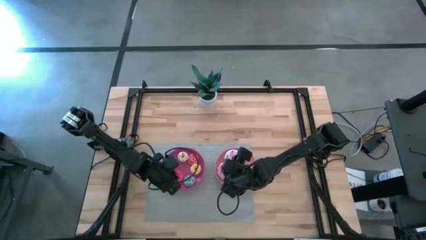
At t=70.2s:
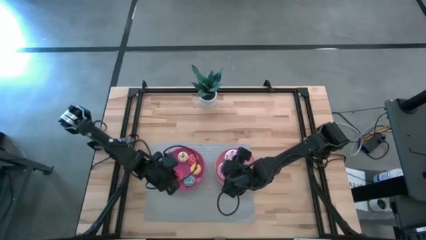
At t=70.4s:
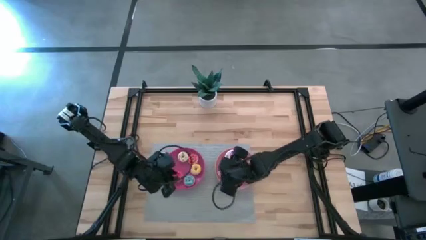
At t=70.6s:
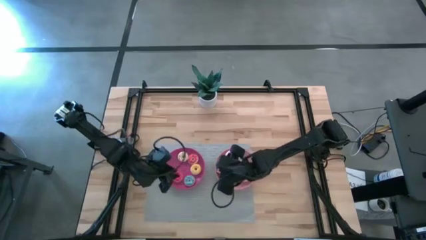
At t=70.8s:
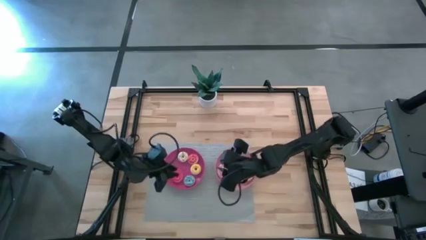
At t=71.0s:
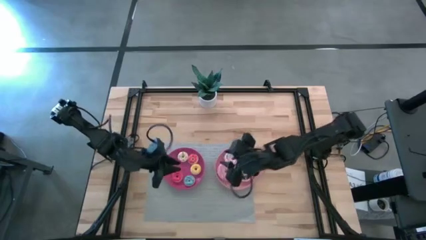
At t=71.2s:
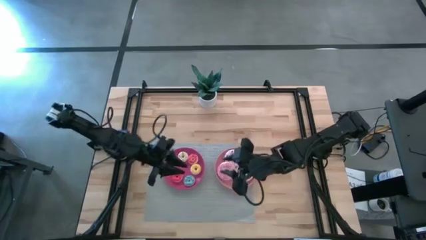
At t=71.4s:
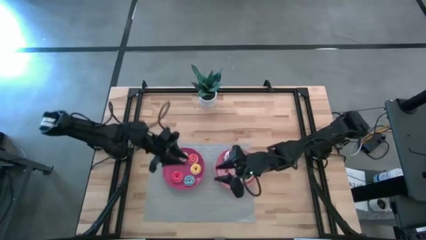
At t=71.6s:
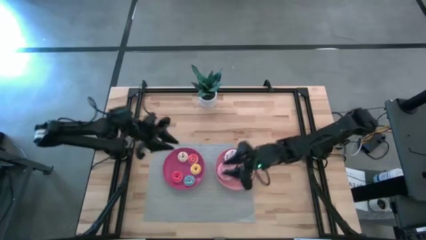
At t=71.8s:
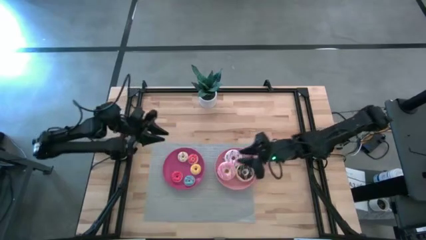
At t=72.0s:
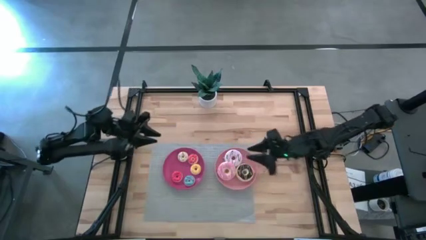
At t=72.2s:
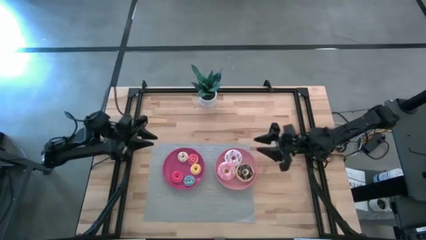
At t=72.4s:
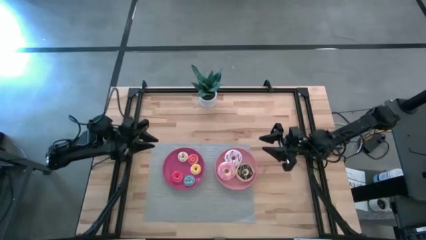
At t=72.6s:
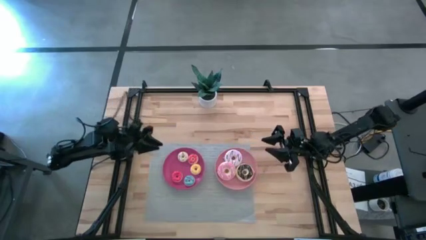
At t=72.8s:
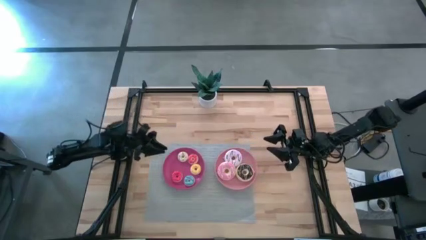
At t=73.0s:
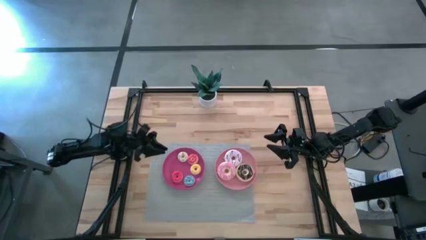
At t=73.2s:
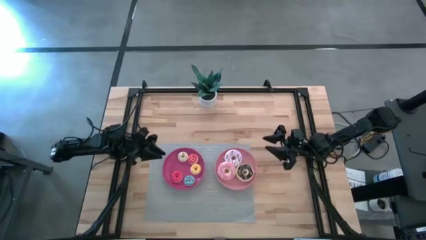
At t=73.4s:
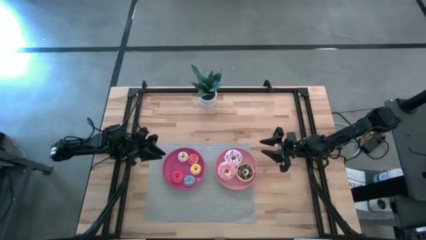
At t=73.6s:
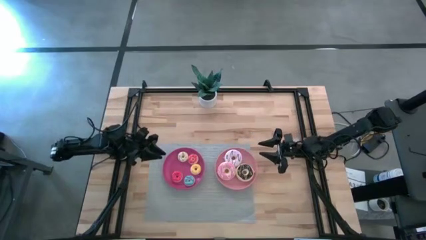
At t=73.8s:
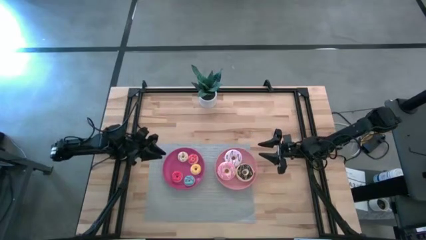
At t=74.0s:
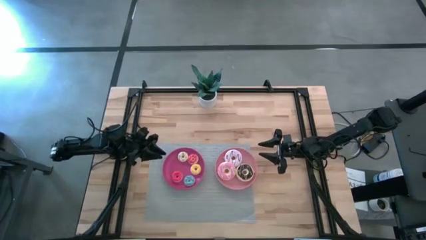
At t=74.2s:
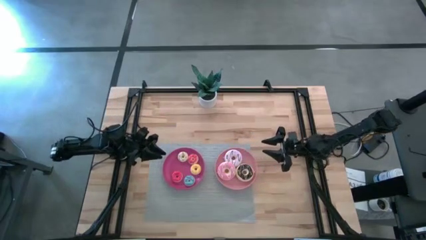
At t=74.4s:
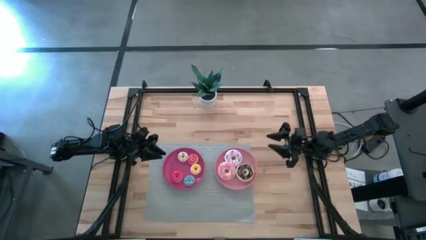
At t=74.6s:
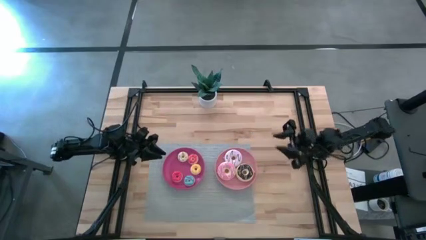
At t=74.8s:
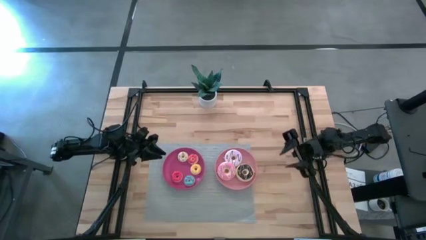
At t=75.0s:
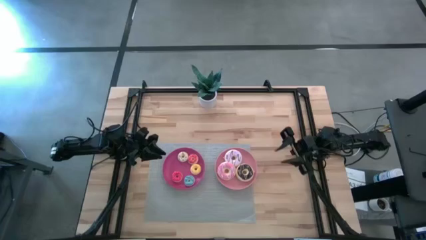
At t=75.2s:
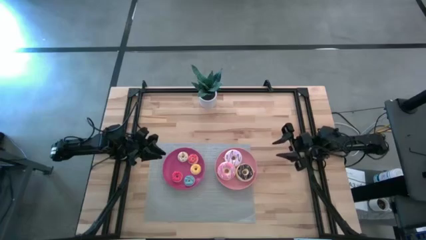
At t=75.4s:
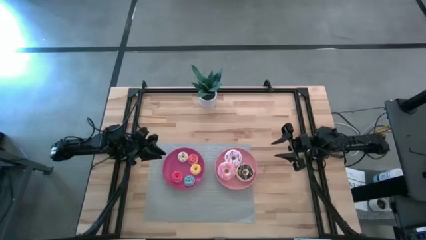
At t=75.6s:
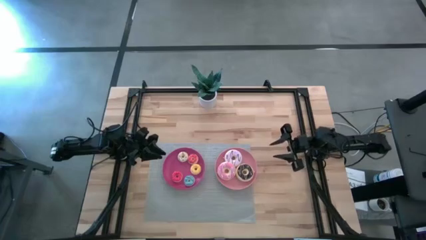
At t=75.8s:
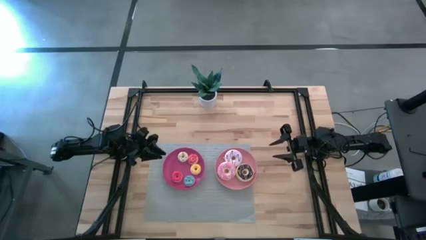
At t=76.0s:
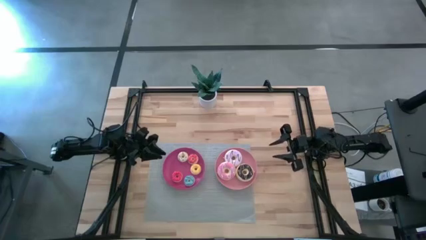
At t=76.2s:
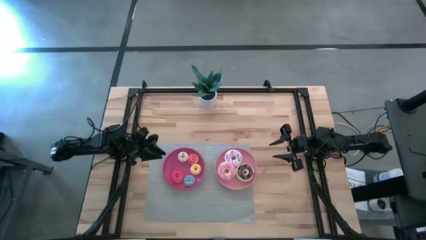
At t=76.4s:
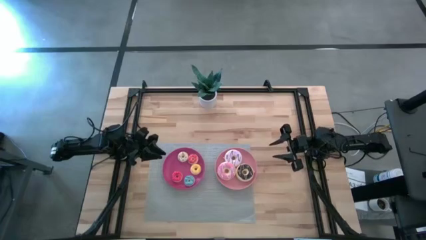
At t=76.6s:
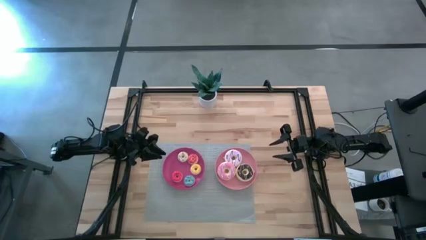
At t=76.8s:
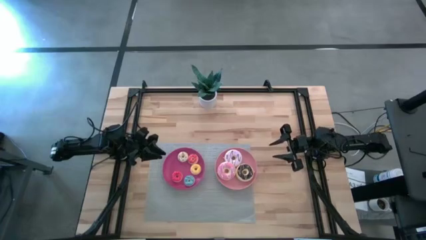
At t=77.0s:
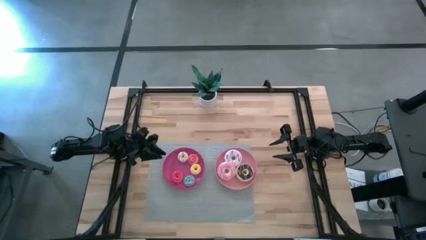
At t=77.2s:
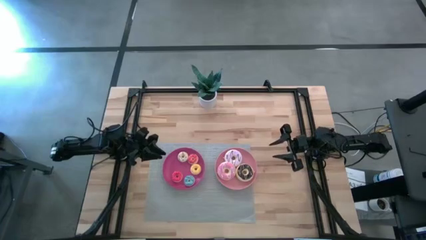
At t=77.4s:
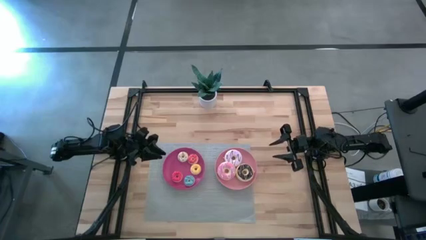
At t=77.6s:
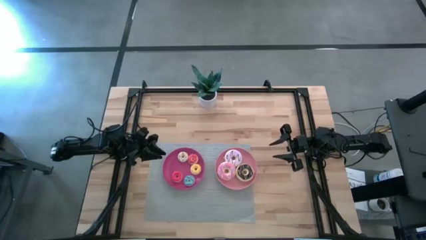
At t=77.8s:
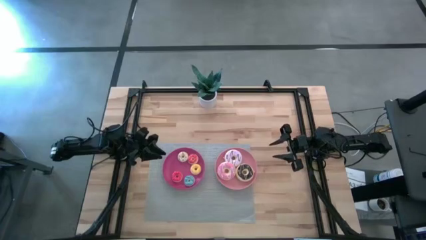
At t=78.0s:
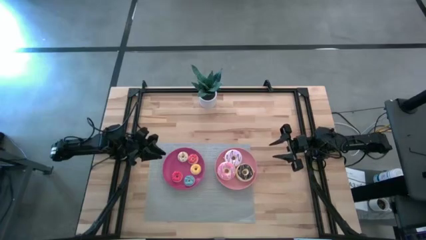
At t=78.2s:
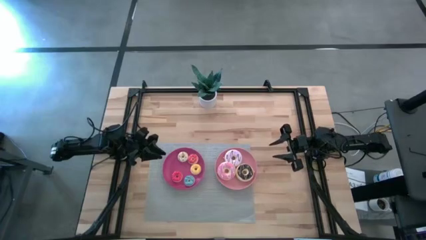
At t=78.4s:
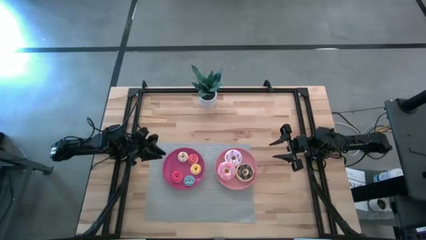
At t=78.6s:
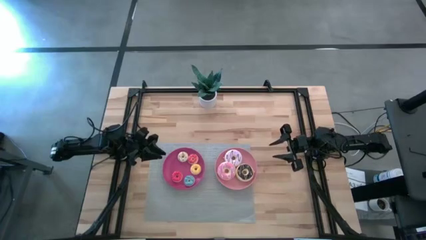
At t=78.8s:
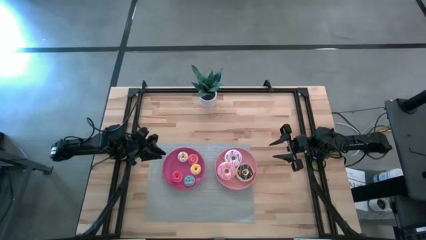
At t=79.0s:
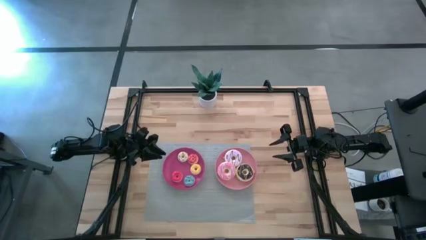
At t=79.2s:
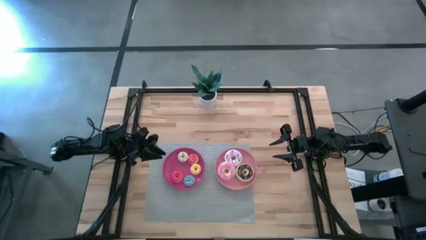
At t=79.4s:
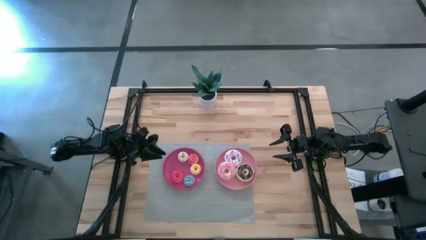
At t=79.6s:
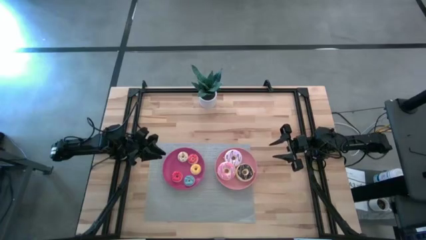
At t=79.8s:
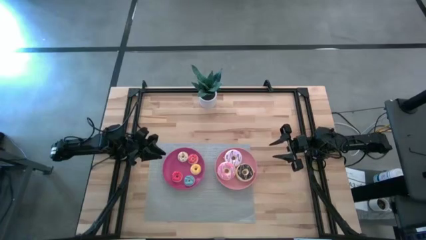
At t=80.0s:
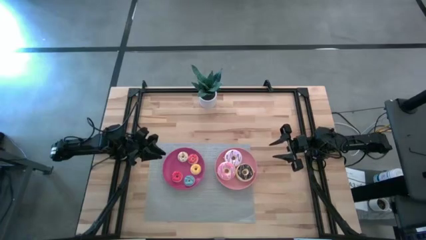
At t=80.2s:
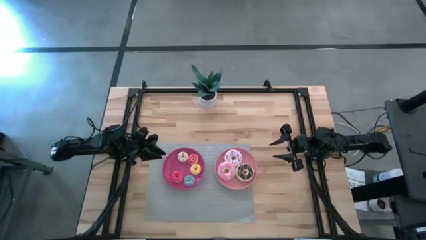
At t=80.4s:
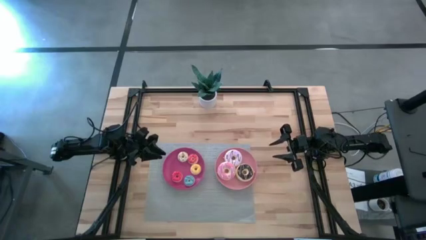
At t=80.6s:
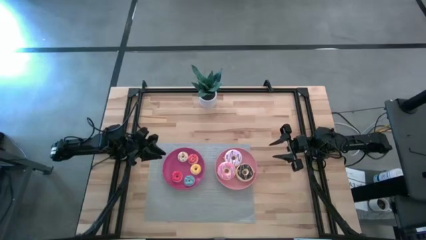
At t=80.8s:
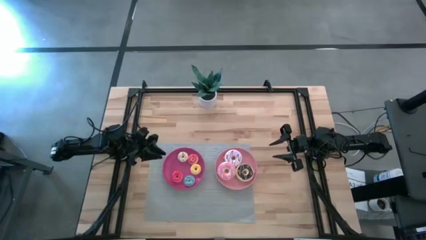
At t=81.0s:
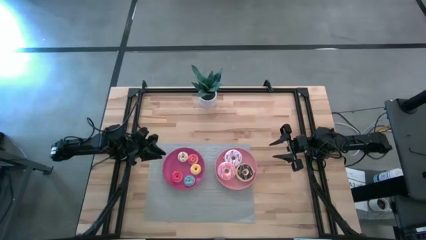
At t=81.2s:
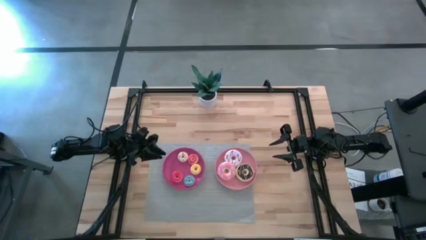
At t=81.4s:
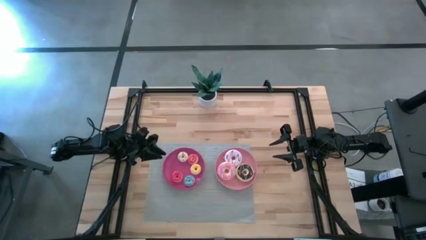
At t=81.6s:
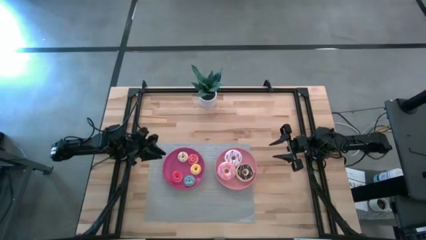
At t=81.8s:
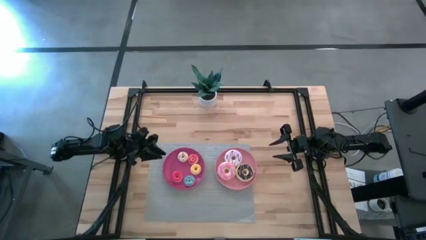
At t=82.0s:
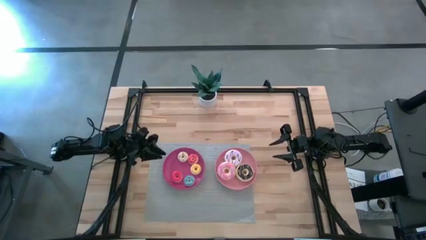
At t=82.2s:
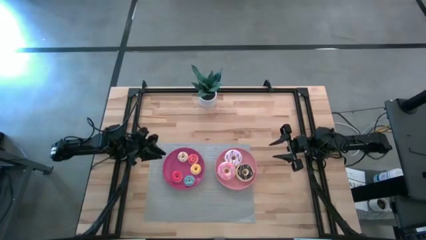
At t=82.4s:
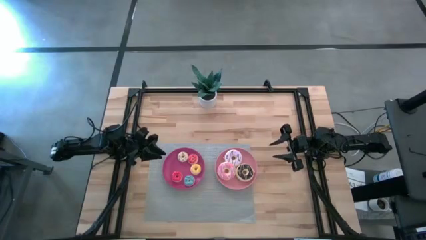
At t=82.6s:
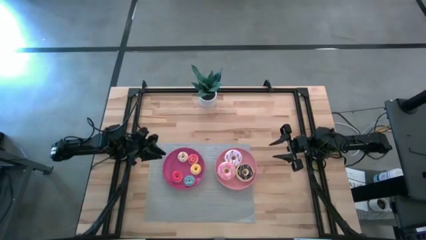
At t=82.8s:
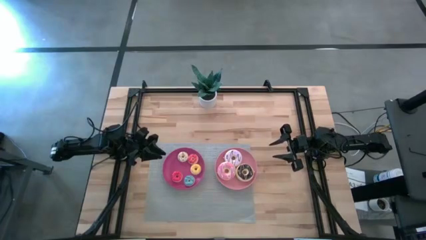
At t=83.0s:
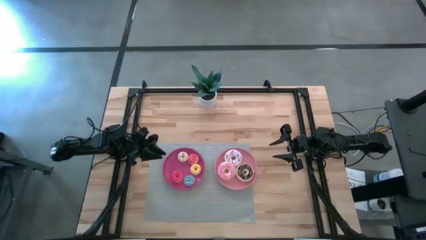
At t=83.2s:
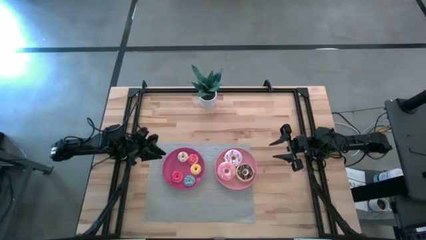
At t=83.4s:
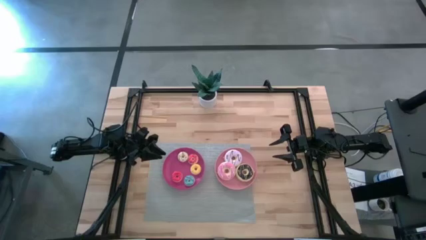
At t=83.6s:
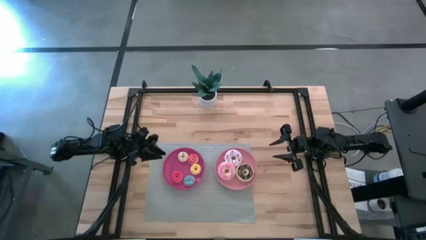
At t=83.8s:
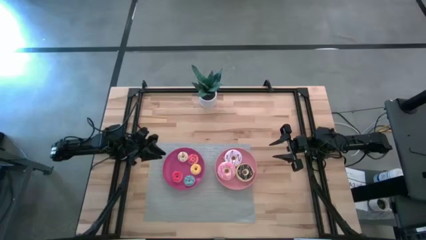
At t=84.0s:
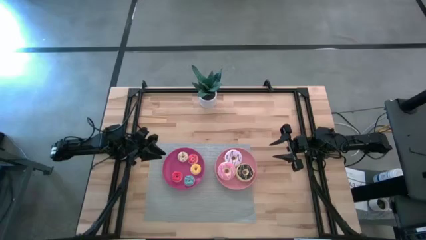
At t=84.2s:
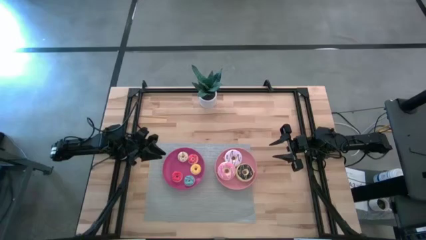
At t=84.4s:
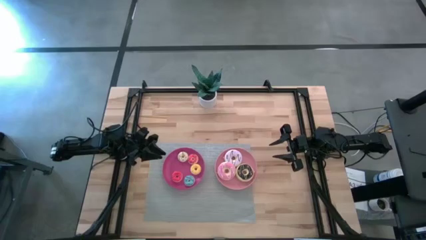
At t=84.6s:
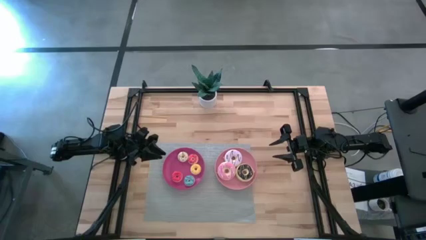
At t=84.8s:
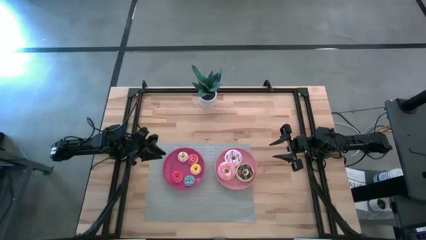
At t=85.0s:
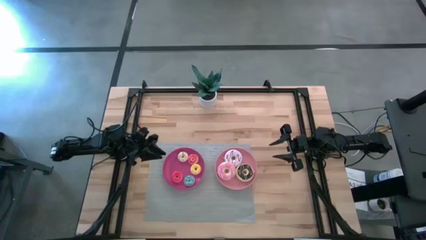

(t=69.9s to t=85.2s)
Task: Pick & Place donuts
Return to Home Position

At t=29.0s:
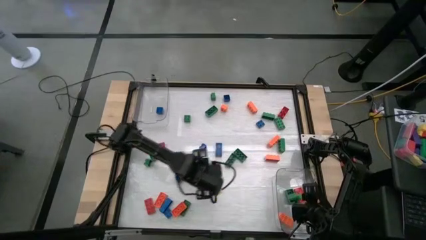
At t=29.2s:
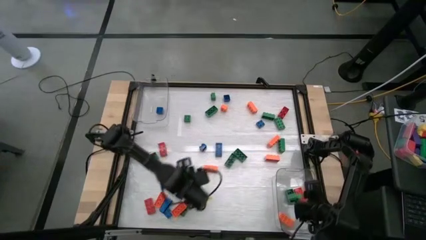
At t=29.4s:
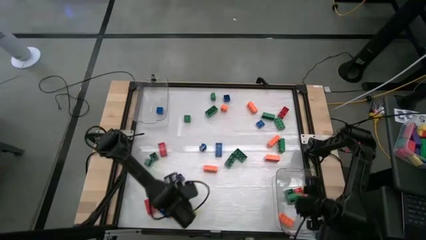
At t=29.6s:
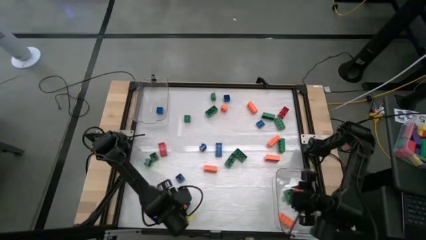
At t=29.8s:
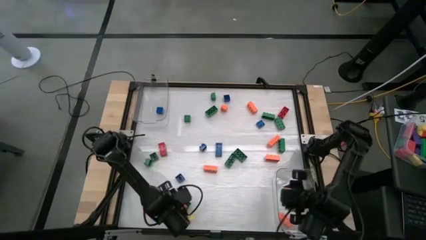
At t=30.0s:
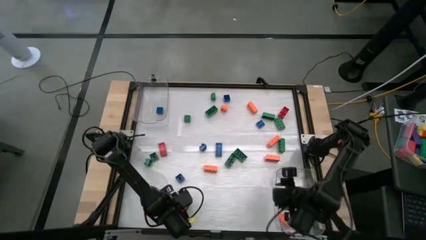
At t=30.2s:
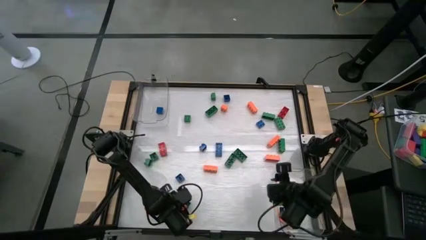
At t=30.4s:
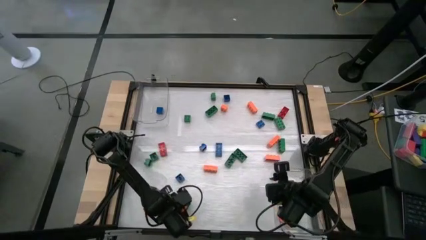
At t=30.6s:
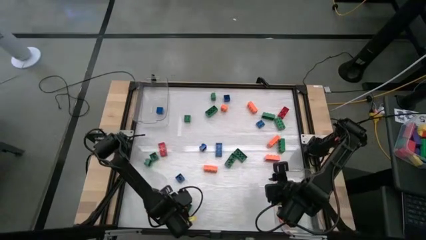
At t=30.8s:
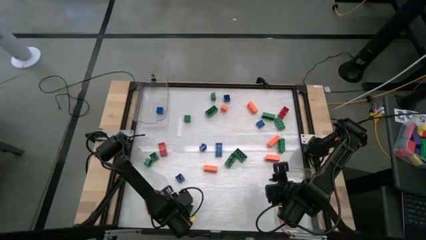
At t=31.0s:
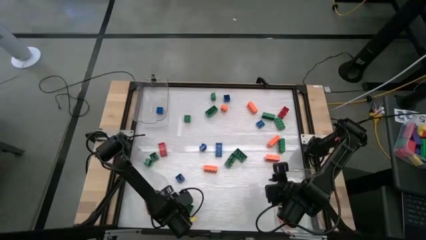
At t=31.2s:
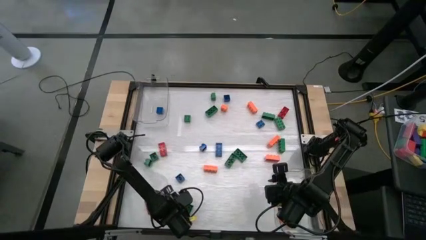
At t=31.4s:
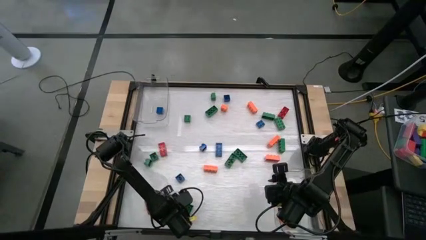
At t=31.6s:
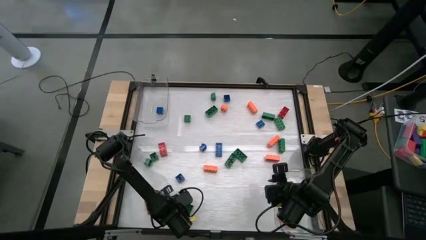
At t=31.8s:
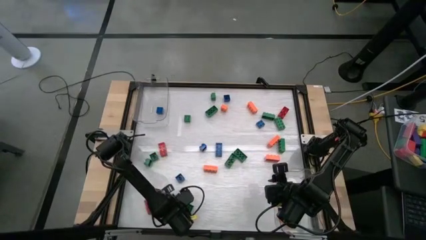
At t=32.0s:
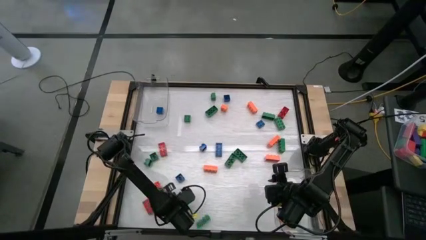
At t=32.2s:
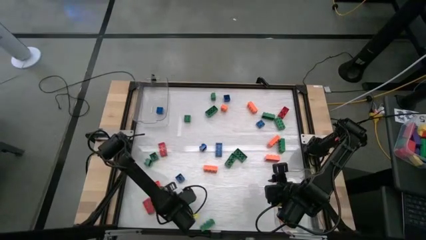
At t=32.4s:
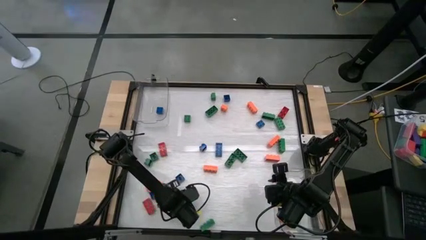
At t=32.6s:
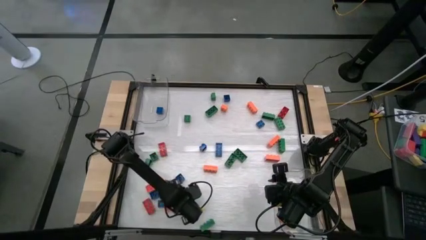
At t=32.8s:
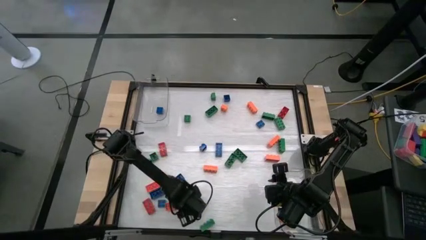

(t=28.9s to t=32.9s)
Task: Sort blocks by size
Put the 8 stud orange game piece into the bottom transparent bin
